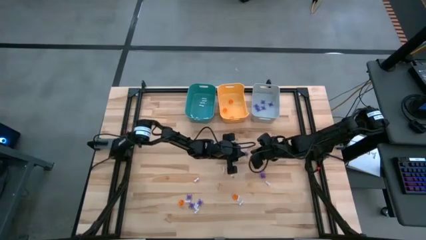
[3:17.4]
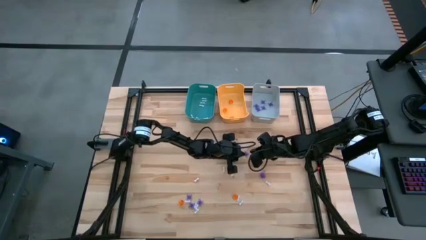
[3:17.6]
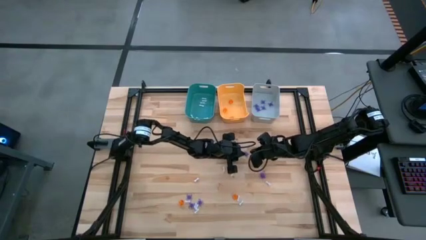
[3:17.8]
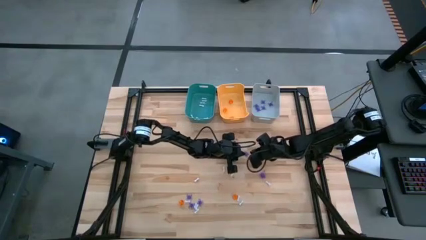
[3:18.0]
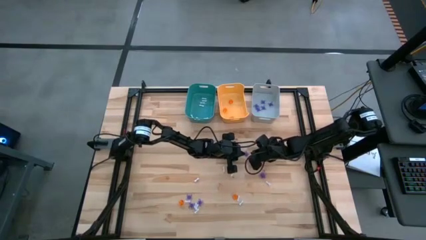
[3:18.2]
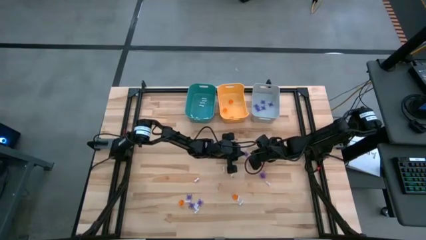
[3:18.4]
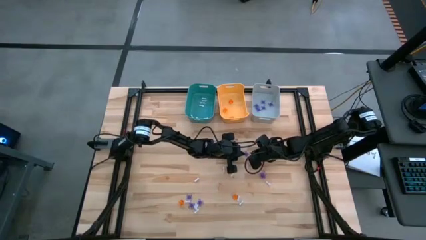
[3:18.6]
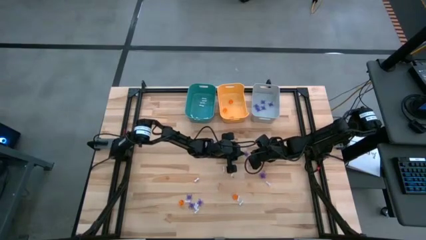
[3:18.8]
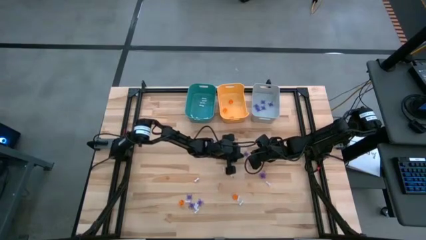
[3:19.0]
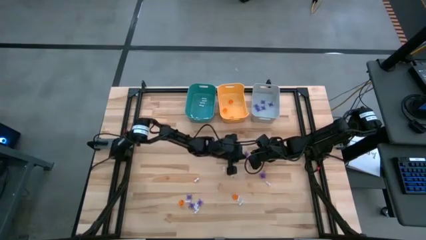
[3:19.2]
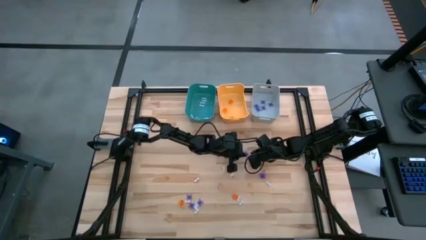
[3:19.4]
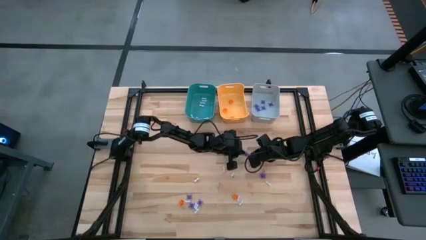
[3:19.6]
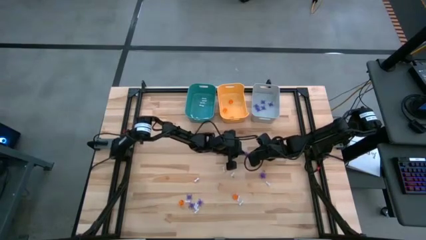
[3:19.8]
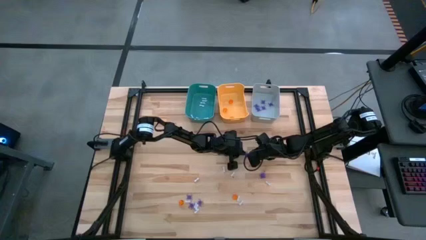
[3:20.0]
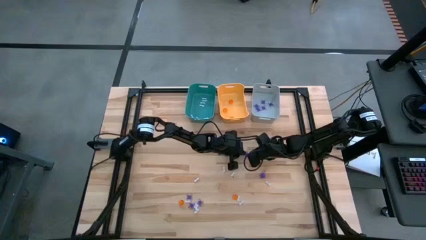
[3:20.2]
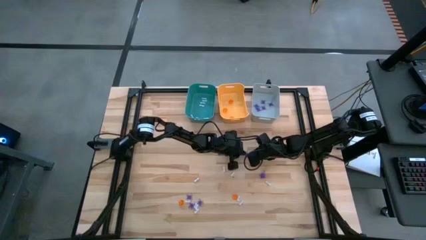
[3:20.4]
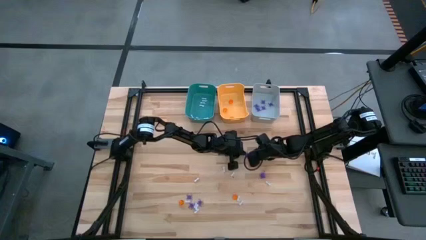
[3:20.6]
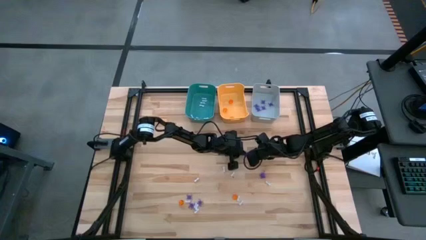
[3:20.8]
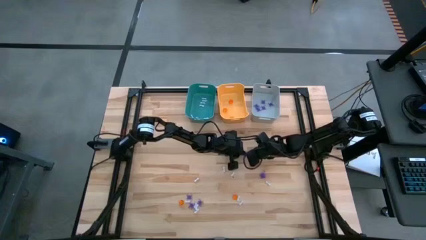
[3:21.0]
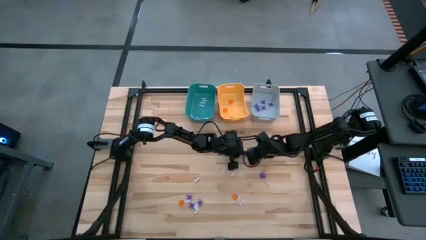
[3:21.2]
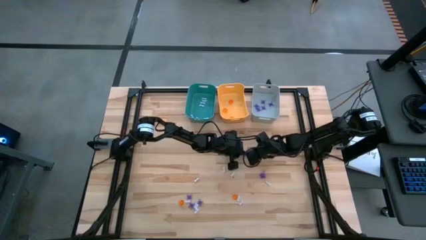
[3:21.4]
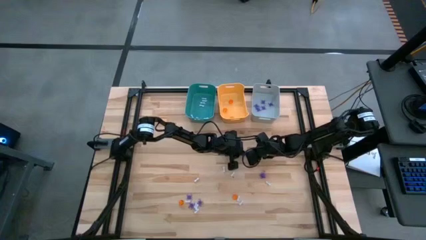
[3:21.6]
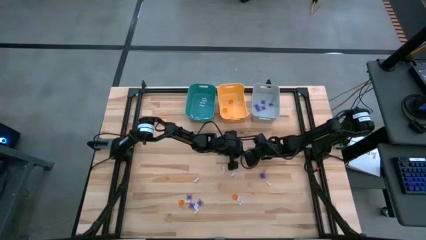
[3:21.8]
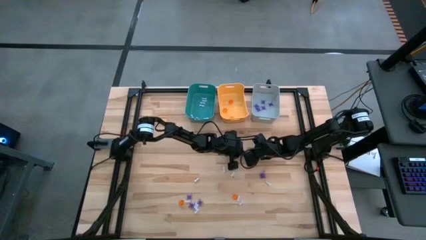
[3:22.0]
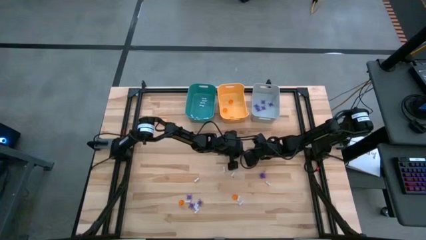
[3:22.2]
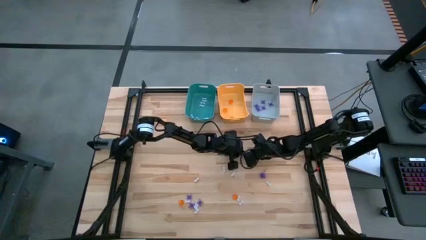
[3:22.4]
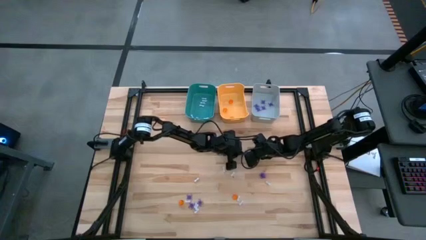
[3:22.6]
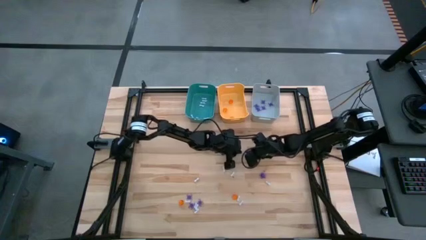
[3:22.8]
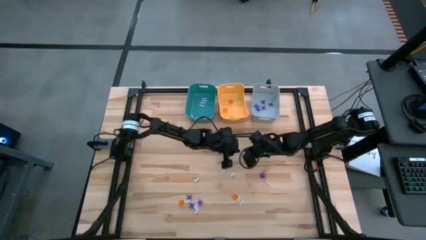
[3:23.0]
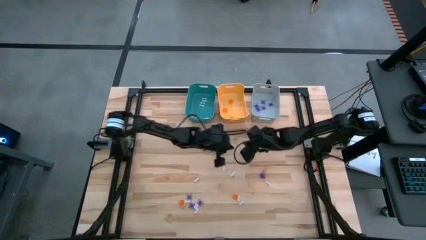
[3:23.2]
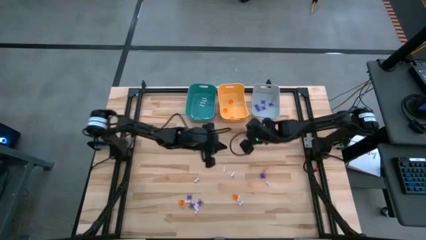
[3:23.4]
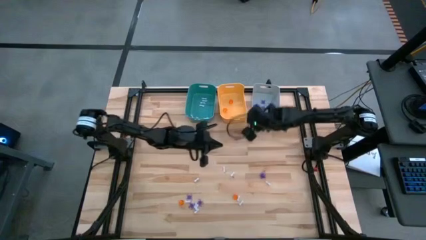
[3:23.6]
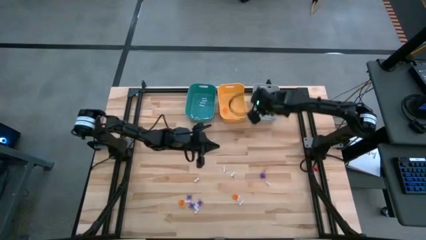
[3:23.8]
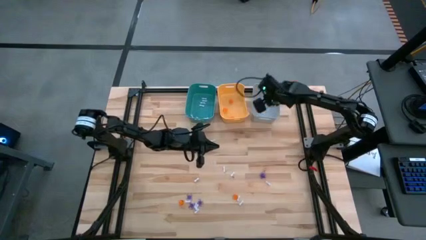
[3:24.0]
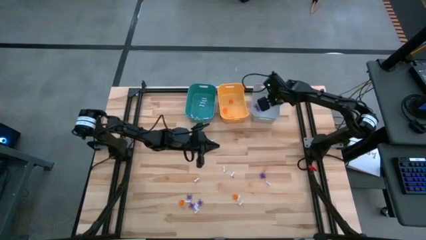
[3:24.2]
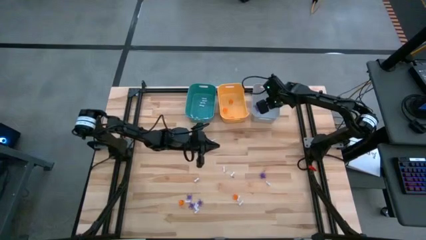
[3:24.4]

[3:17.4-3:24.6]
Task: Sort Halloween decoration
Put the purple spider toy into the gray bin

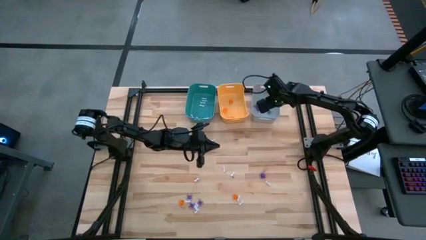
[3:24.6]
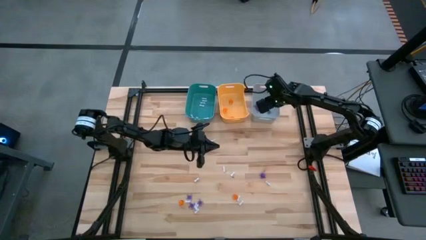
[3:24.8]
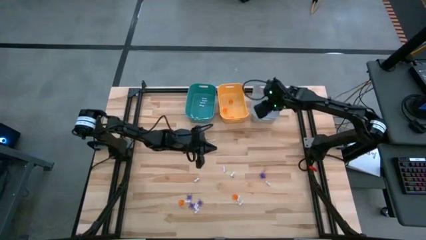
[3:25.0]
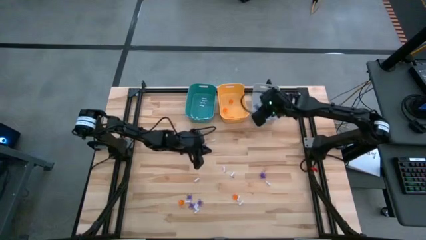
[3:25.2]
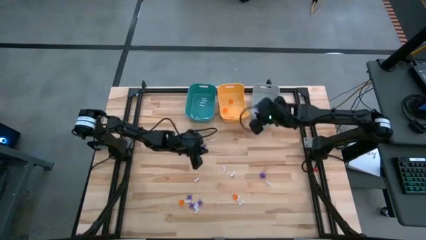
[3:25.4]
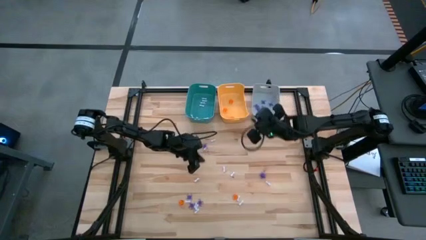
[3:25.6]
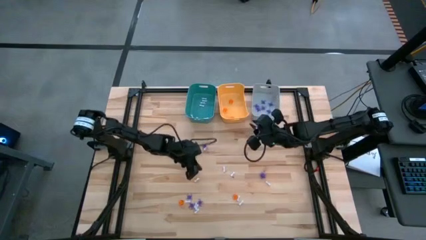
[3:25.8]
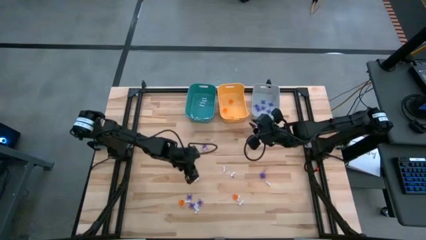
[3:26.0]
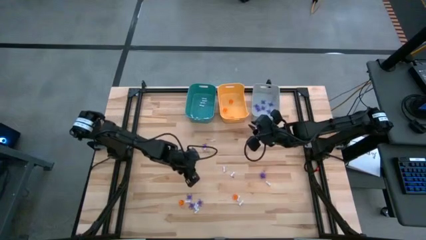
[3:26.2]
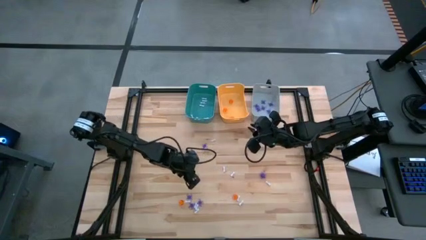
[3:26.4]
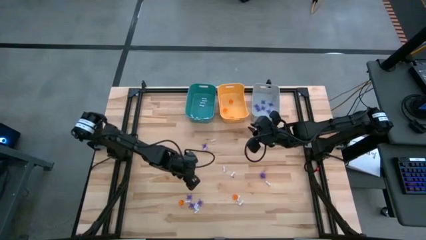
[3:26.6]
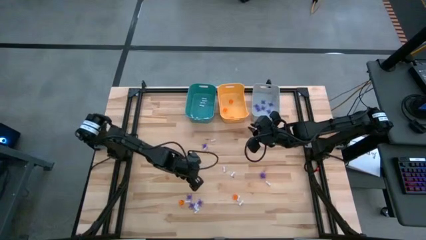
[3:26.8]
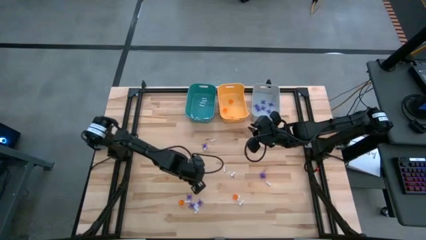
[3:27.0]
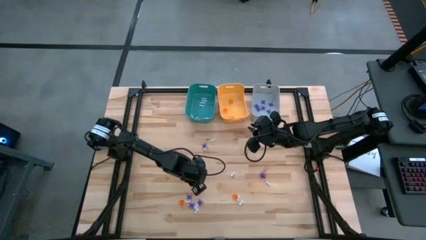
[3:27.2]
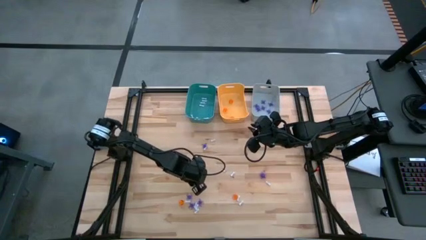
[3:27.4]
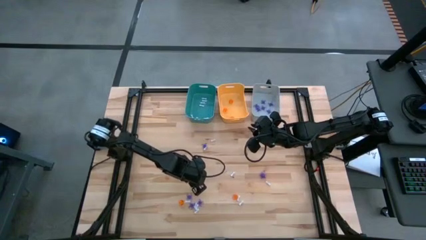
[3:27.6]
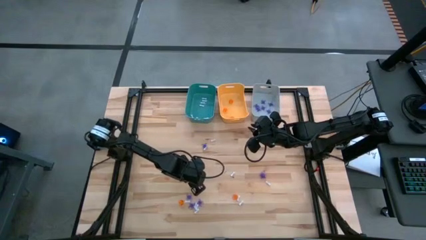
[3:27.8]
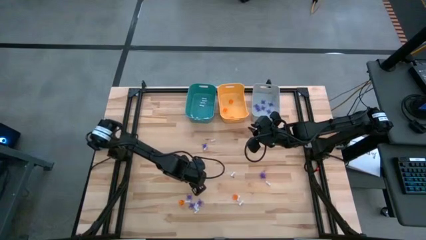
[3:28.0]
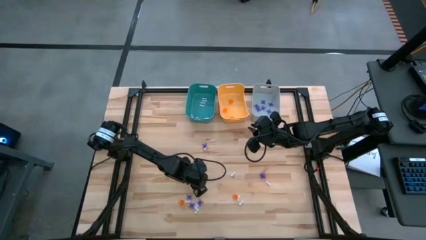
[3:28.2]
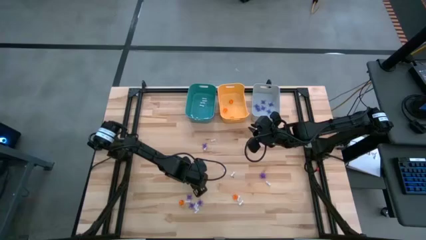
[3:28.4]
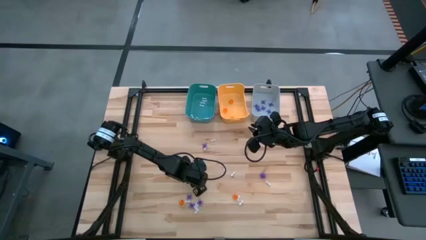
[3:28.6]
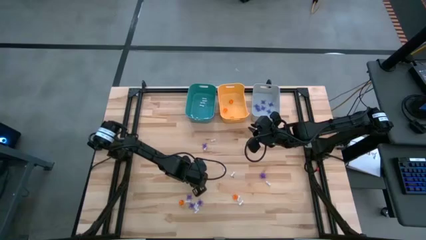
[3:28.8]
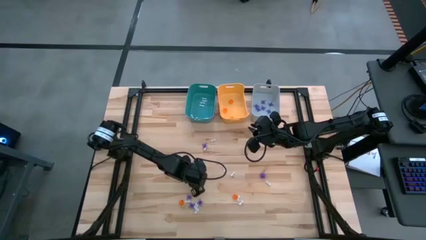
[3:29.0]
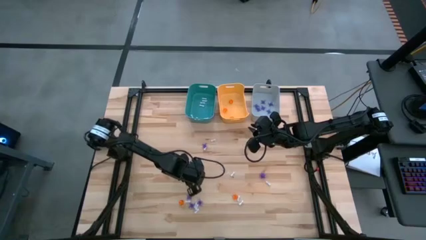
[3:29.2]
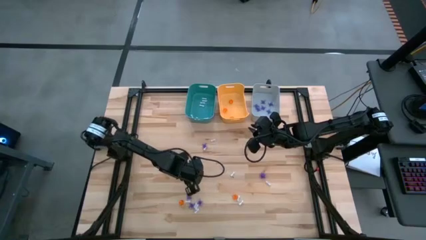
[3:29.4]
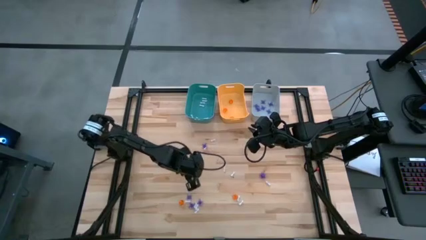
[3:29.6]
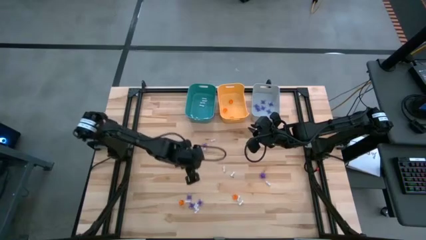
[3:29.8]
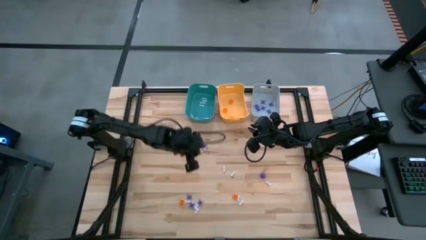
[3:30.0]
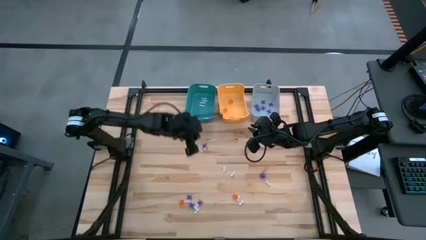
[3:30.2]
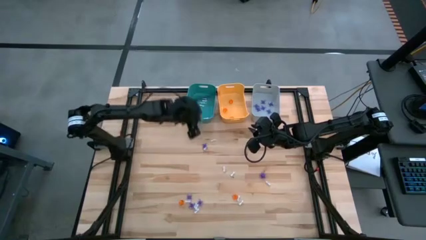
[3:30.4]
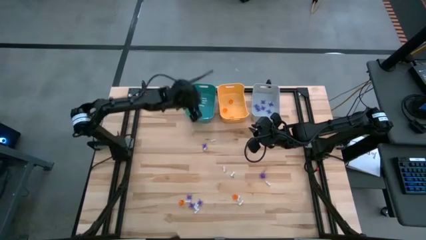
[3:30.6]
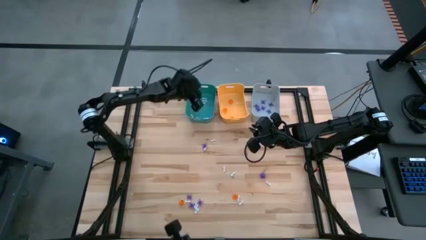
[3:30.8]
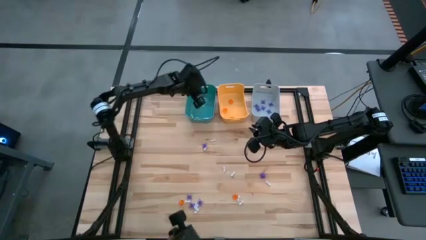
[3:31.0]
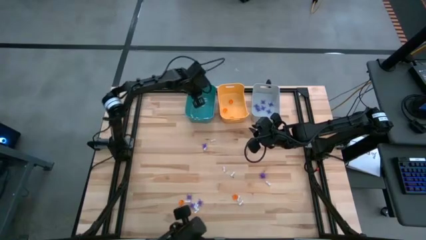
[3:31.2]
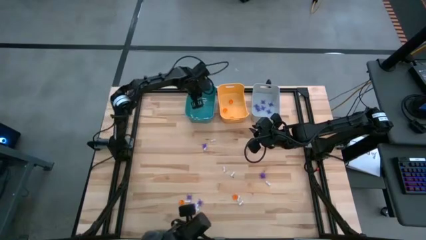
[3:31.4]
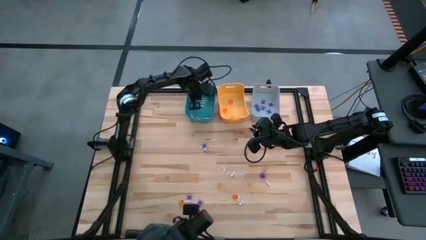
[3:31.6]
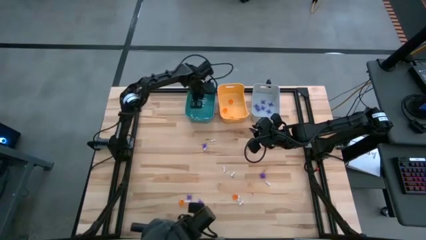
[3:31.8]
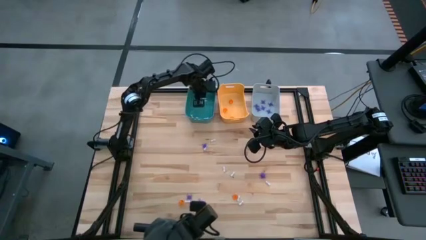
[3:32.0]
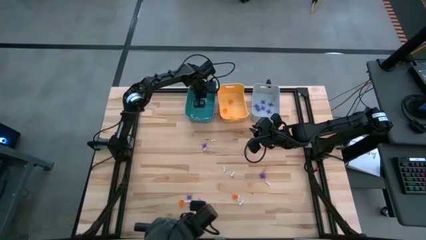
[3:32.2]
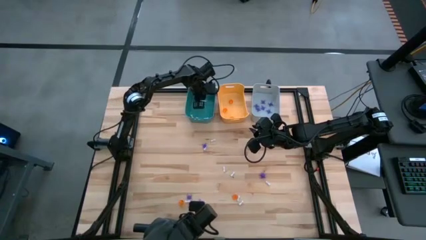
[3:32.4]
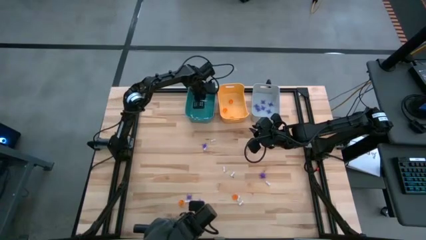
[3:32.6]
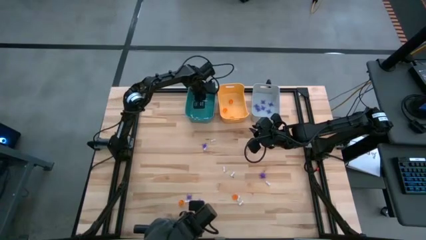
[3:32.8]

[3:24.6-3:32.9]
Put the white bone toy into the blue bin
